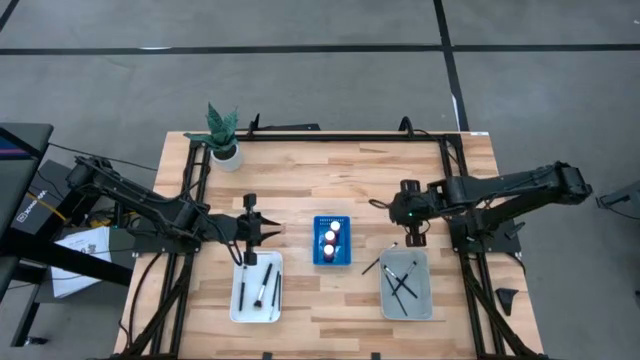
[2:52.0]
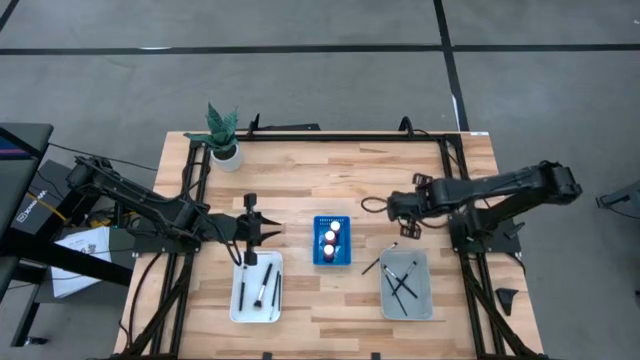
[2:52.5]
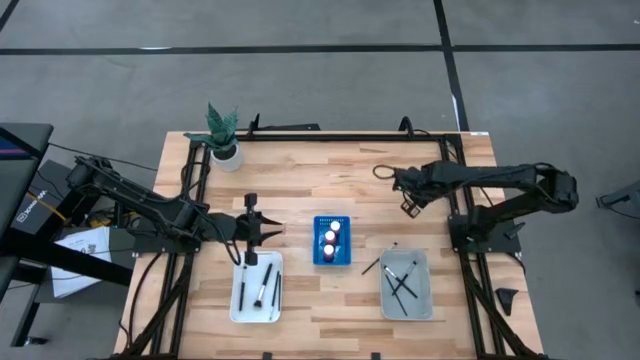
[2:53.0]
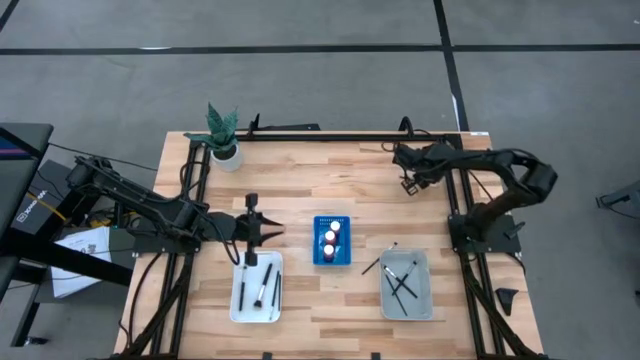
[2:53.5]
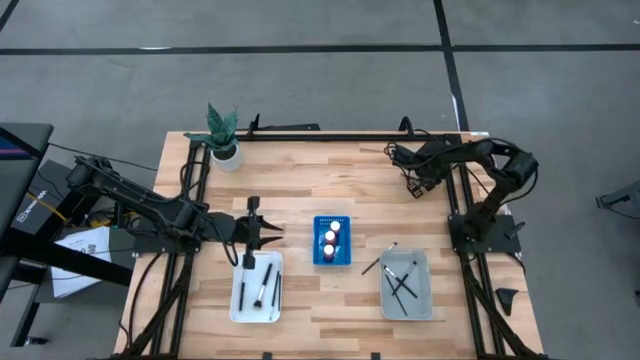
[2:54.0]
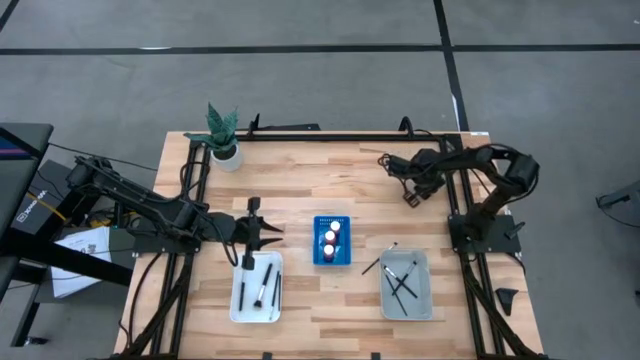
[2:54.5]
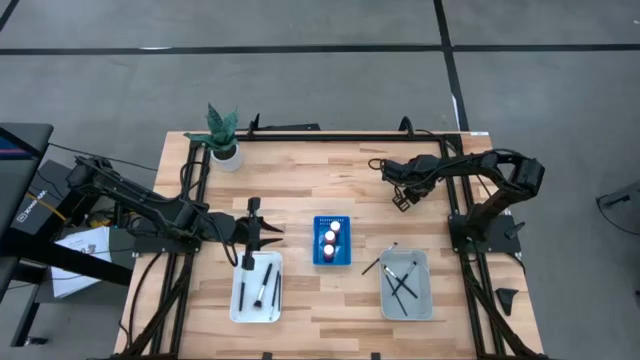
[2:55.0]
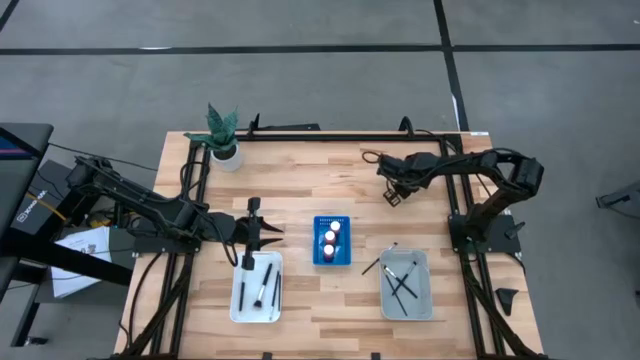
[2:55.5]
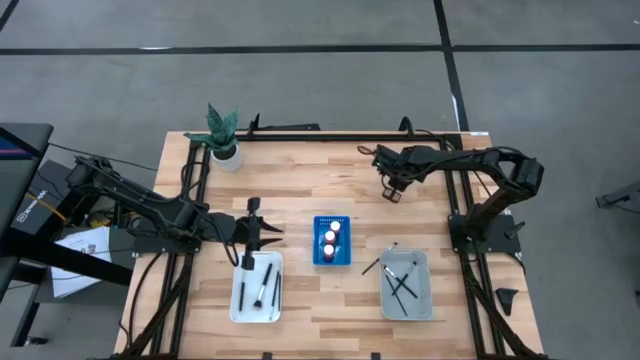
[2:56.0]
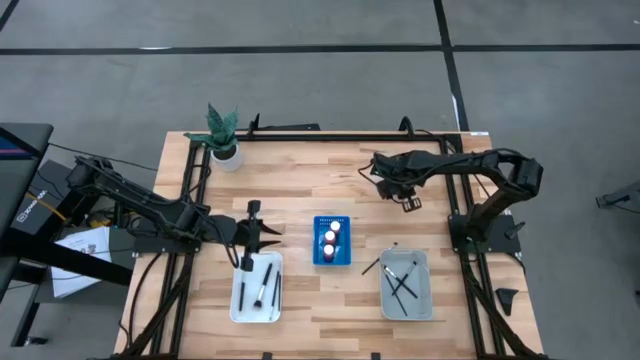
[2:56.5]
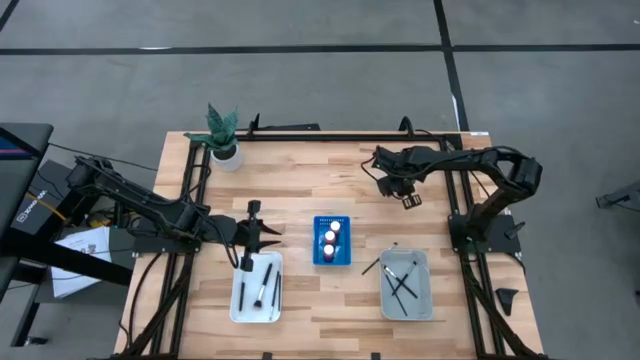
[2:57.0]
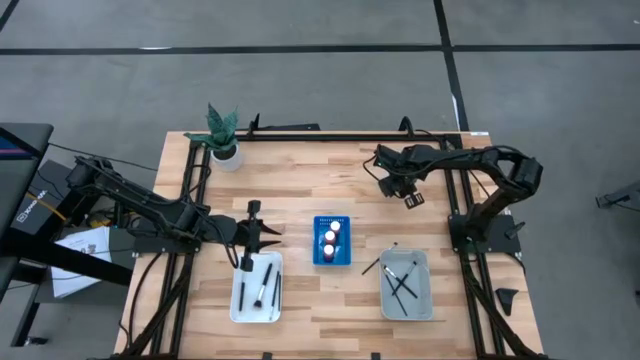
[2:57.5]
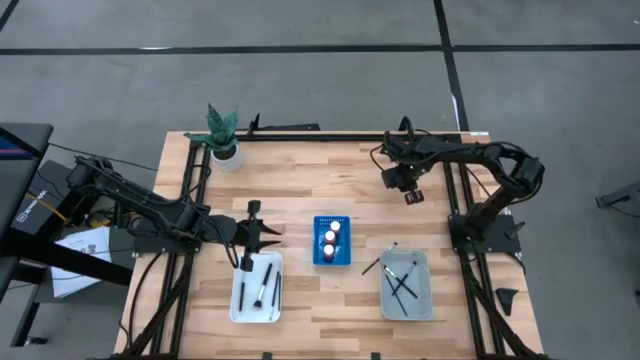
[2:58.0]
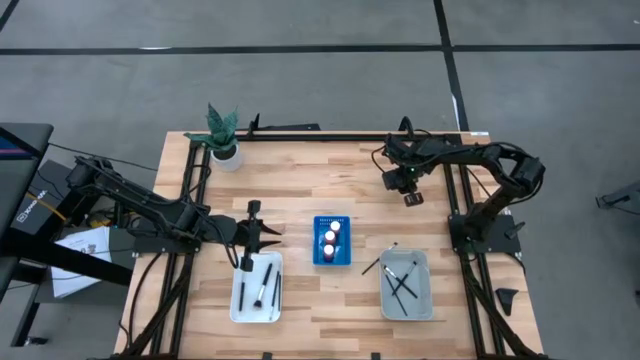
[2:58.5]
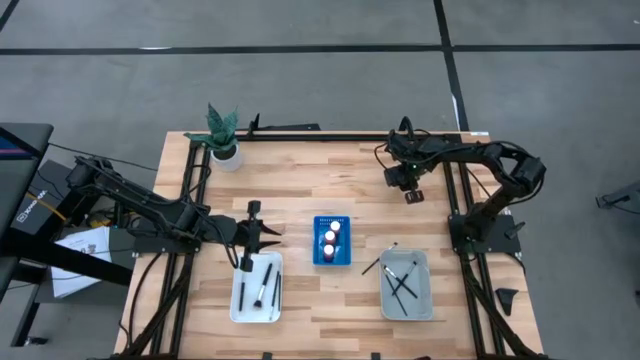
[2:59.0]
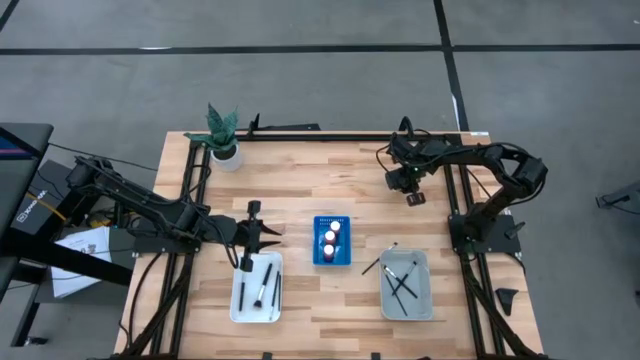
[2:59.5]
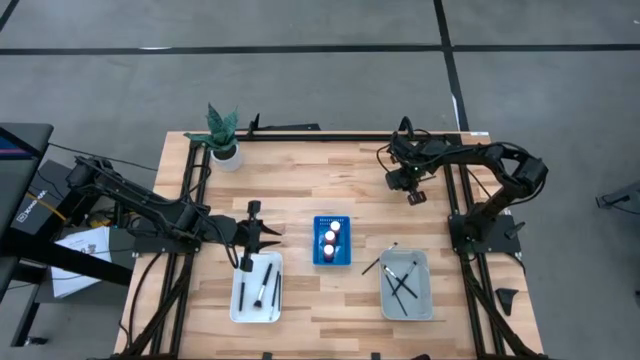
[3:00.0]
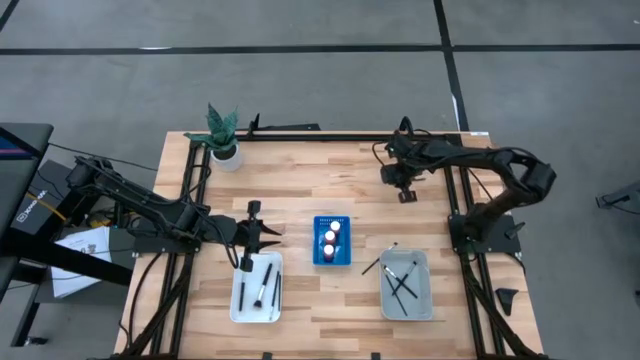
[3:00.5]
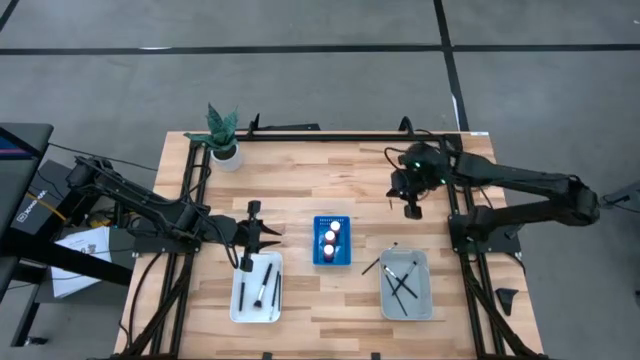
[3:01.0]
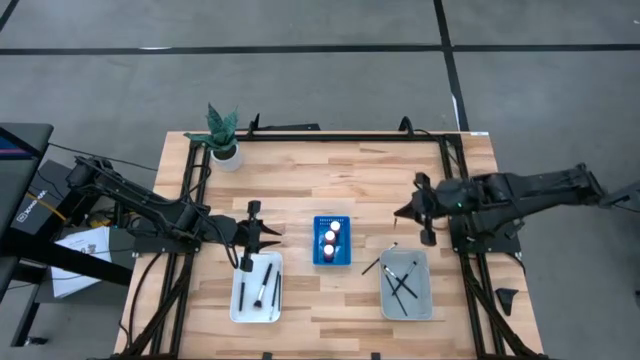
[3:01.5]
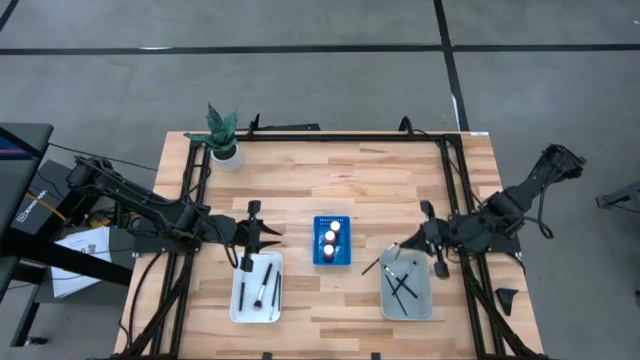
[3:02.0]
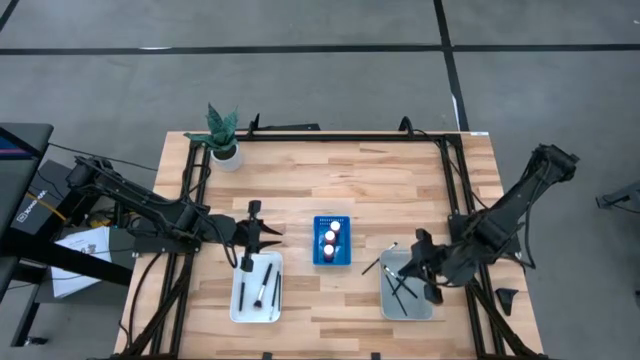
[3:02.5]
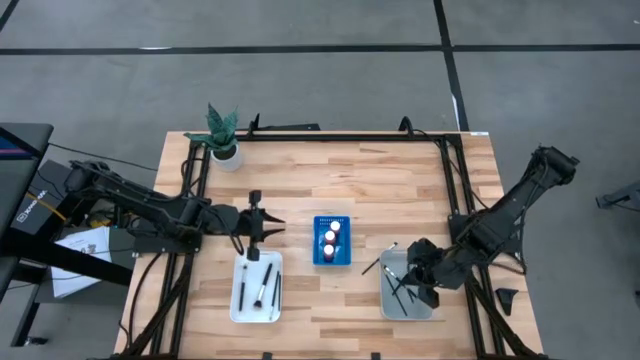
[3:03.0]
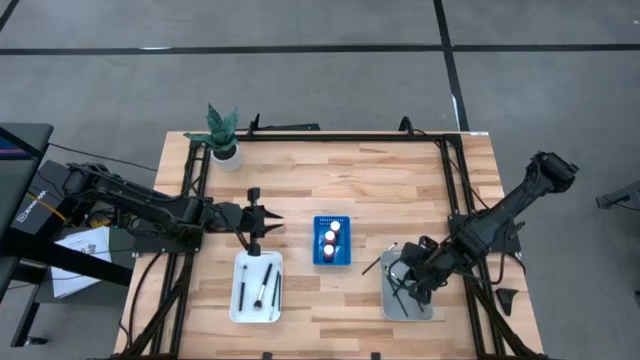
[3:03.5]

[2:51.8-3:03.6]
Task: Pick & Place Paint Supplies
Put the liner brush into the gray bin

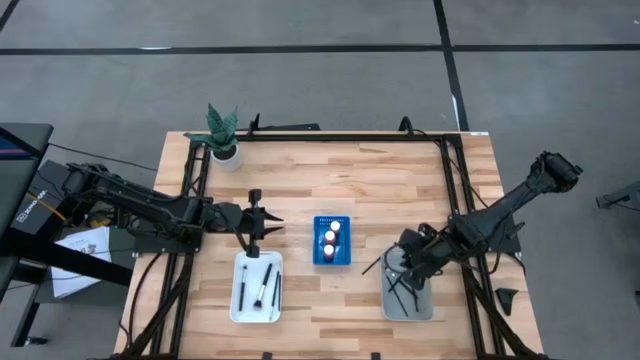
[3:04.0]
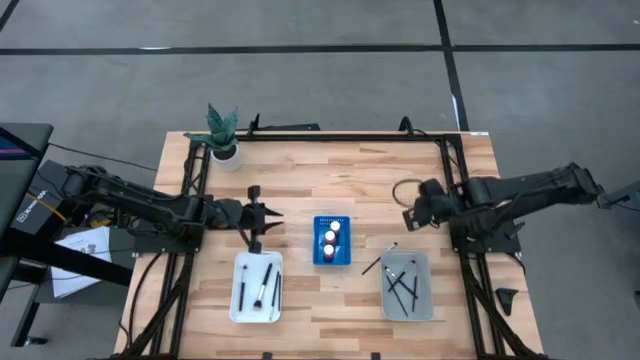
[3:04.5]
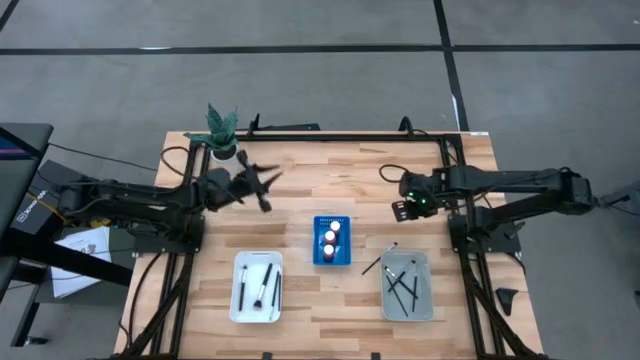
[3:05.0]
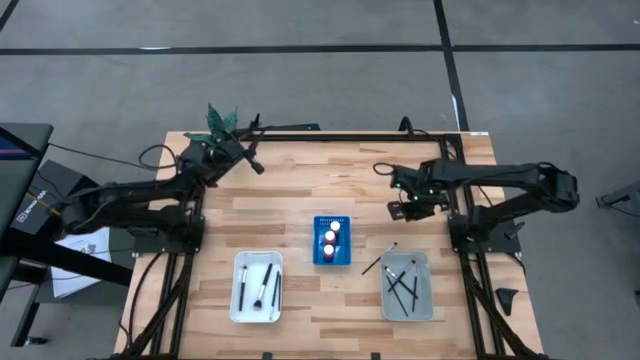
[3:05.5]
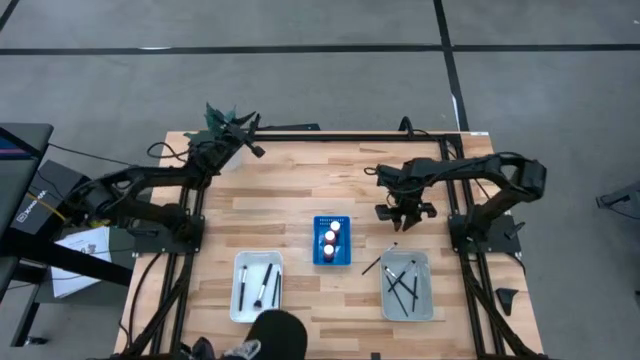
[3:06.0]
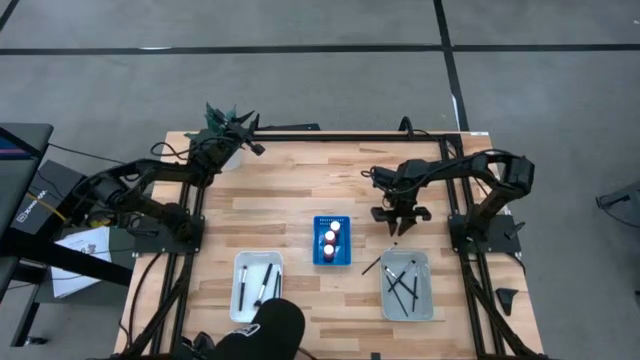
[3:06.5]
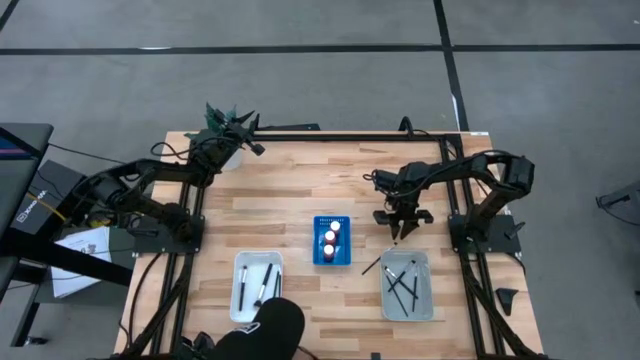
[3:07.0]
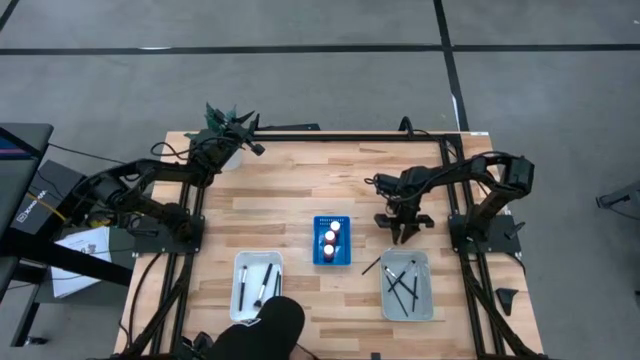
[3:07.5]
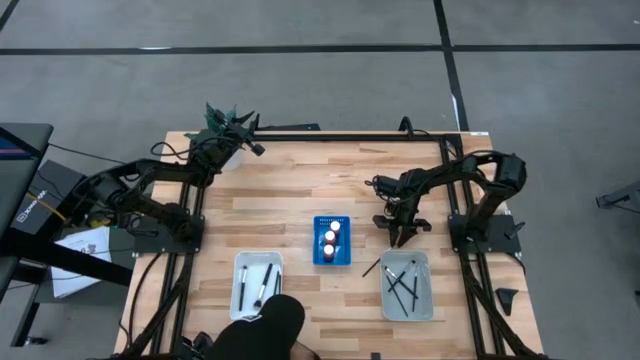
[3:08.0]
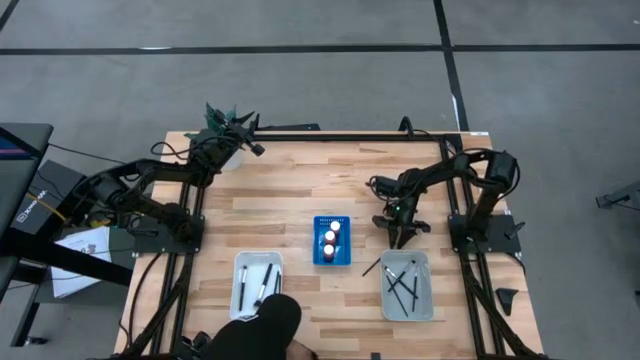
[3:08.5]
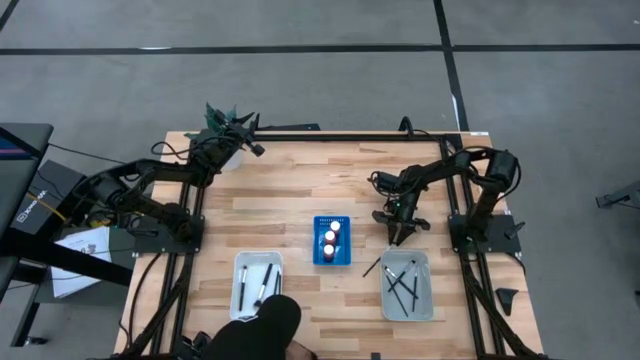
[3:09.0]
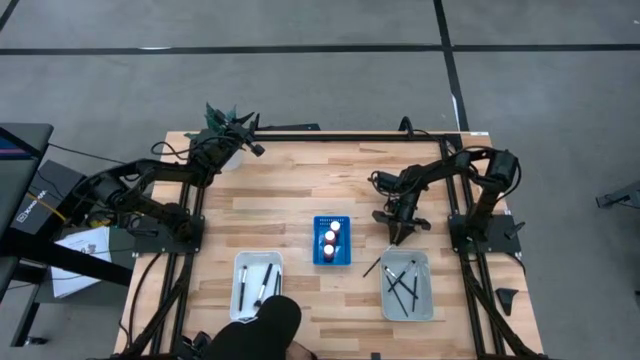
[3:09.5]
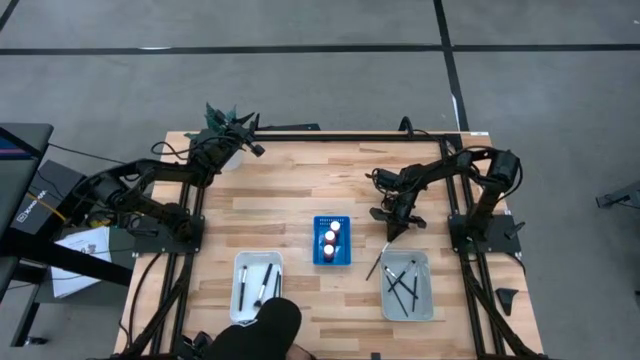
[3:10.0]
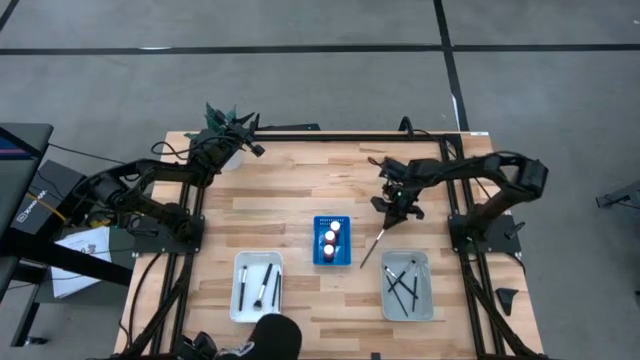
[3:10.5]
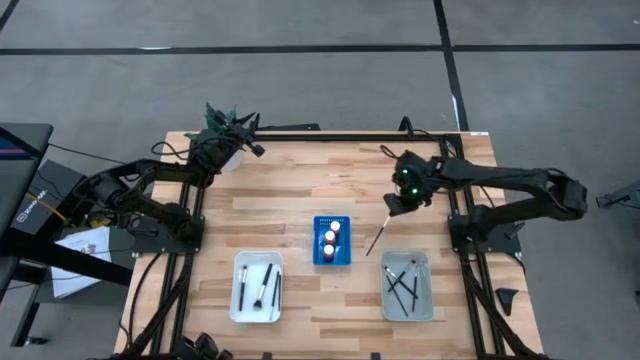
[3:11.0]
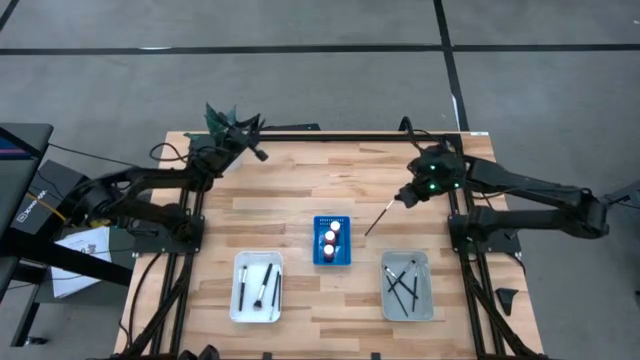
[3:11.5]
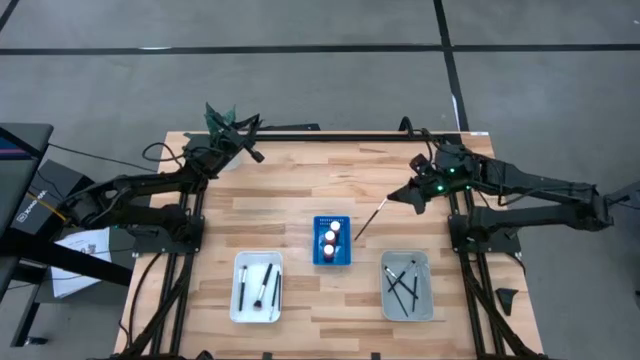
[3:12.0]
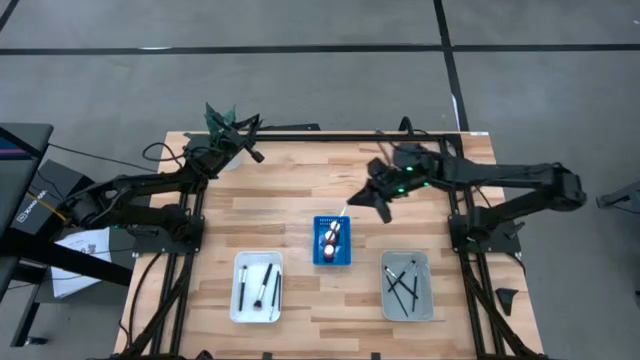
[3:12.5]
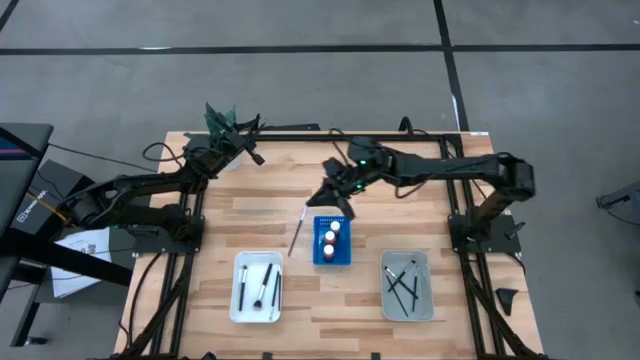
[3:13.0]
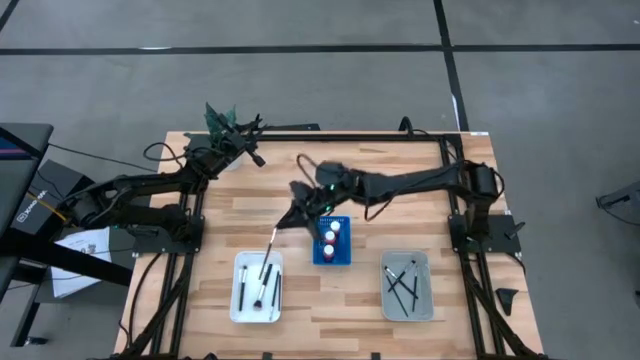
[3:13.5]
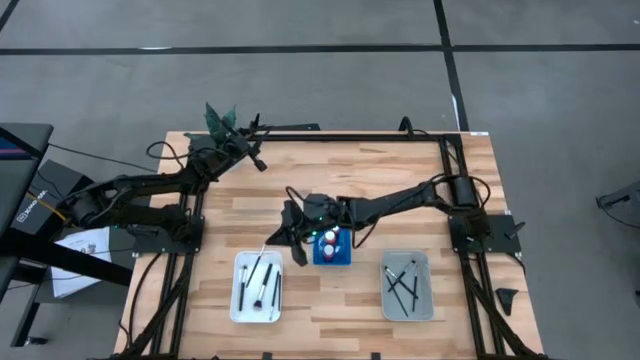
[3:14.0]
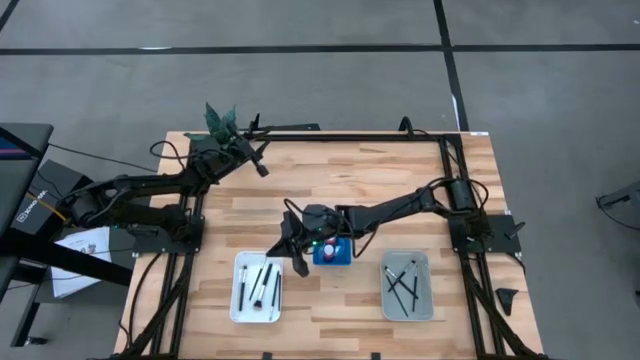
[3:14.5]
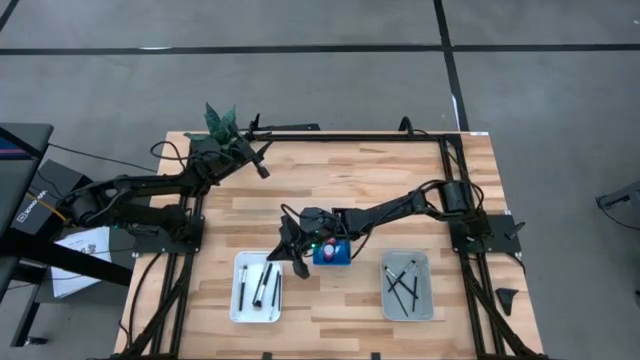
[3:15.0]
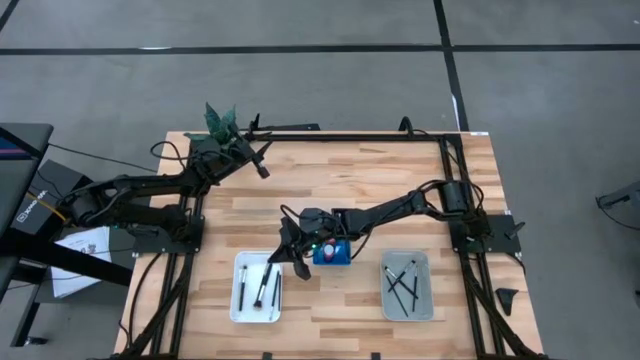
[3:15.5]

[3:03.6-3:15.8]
Put the eyeshadow brush into the white bin
